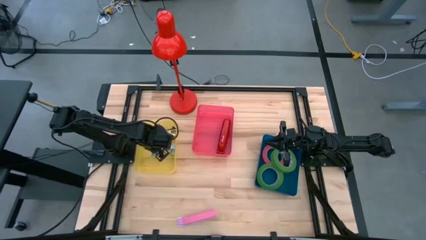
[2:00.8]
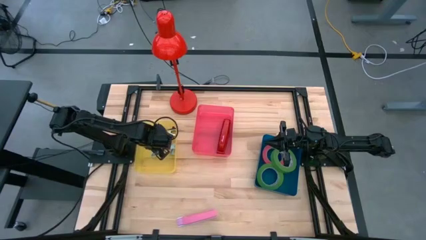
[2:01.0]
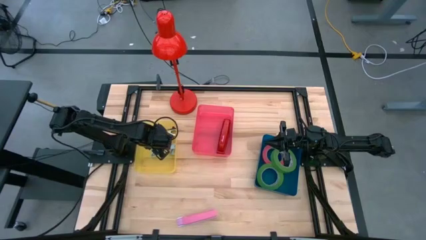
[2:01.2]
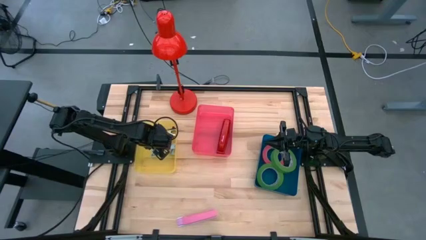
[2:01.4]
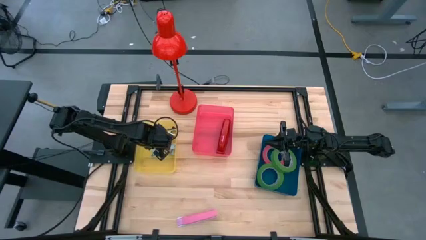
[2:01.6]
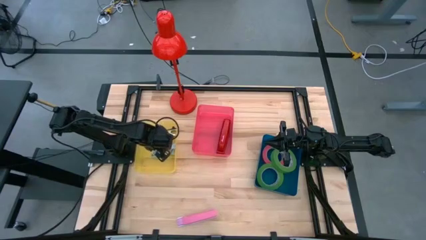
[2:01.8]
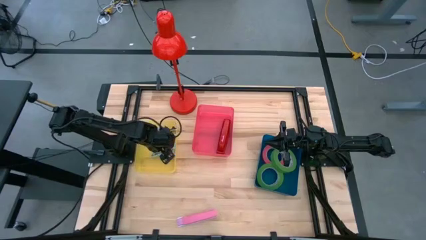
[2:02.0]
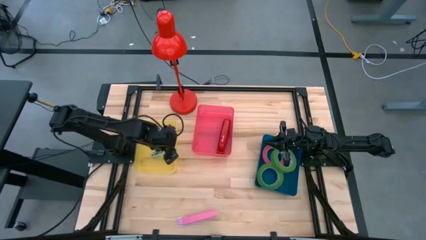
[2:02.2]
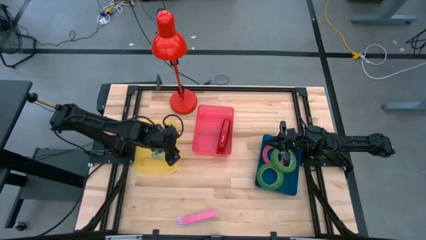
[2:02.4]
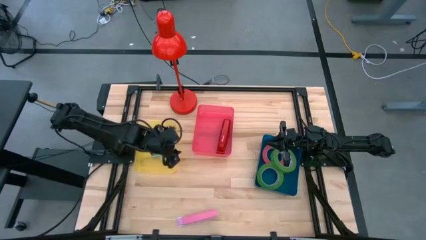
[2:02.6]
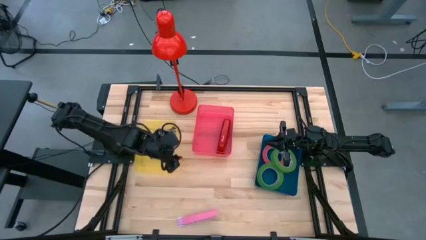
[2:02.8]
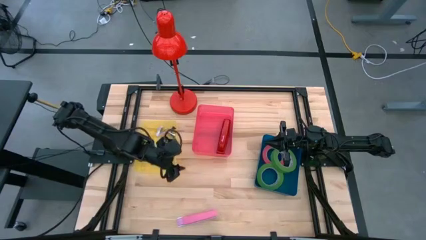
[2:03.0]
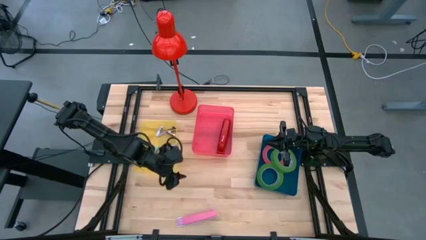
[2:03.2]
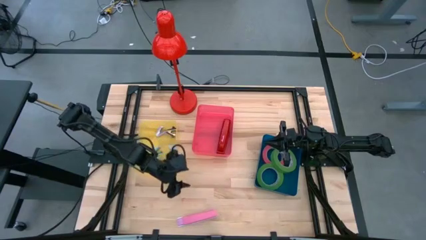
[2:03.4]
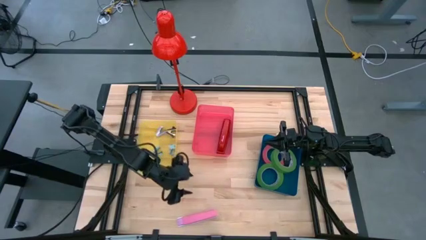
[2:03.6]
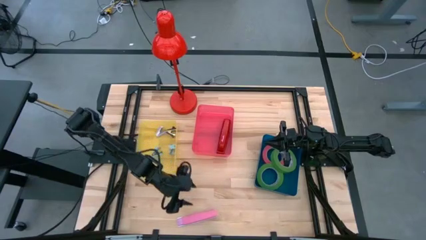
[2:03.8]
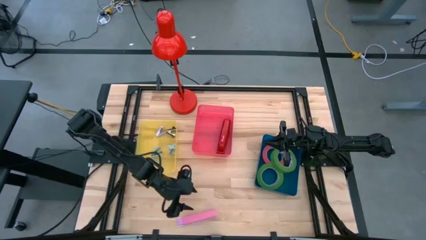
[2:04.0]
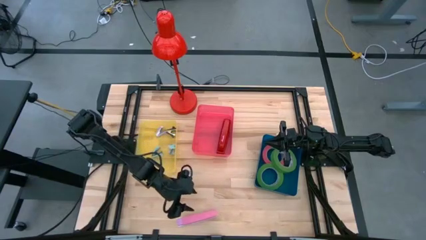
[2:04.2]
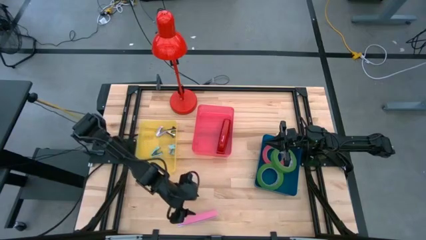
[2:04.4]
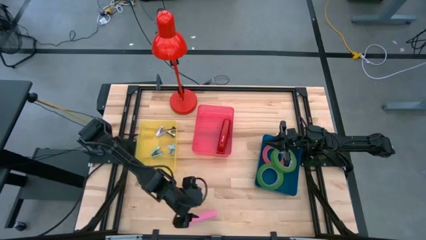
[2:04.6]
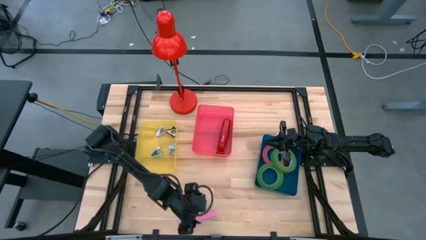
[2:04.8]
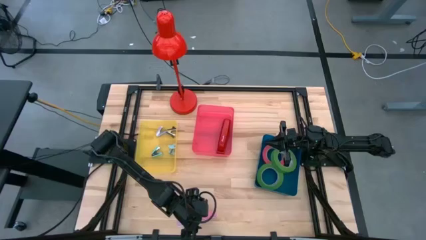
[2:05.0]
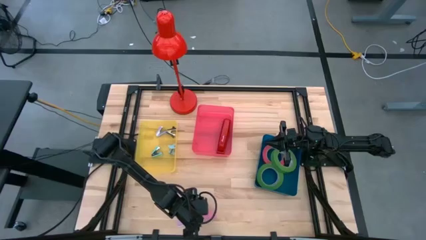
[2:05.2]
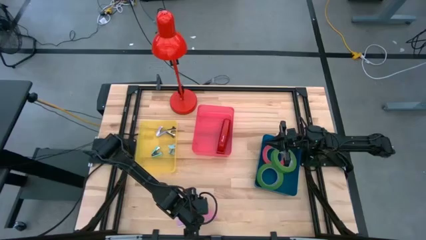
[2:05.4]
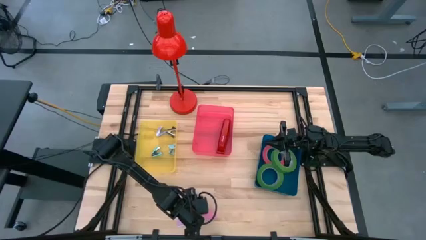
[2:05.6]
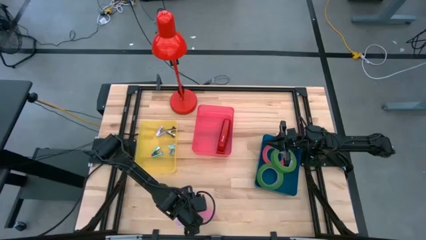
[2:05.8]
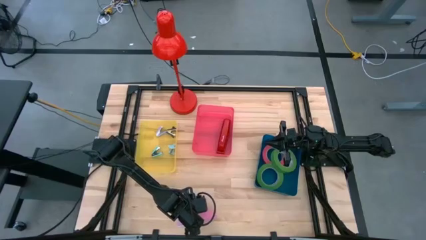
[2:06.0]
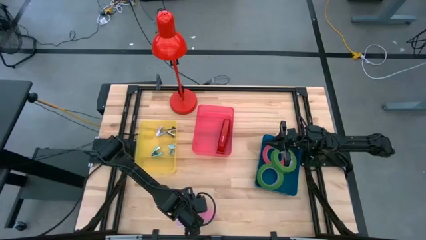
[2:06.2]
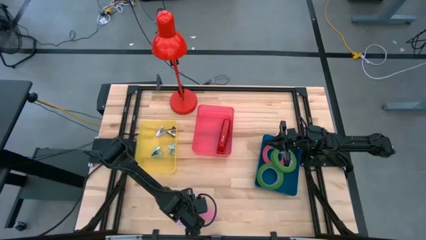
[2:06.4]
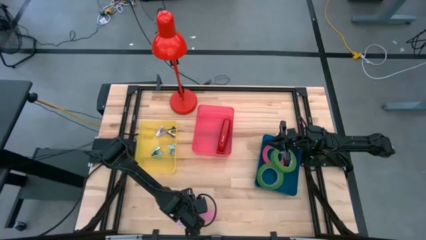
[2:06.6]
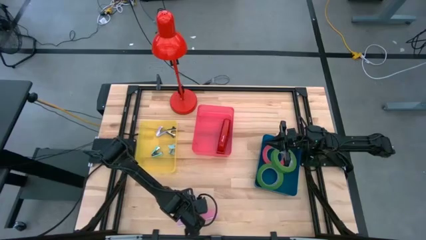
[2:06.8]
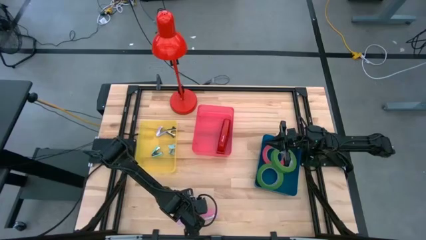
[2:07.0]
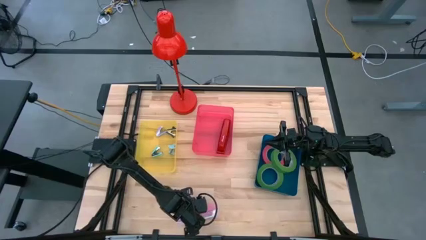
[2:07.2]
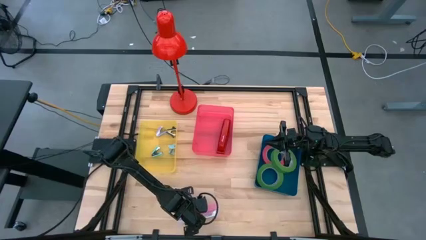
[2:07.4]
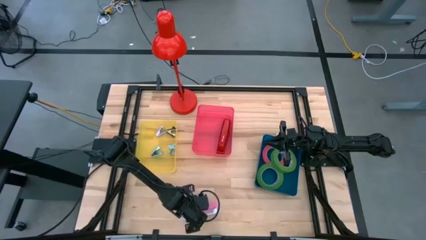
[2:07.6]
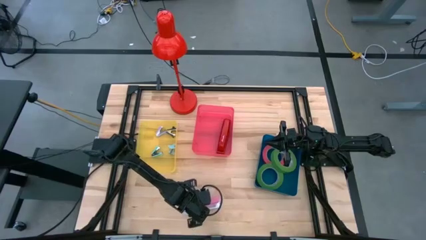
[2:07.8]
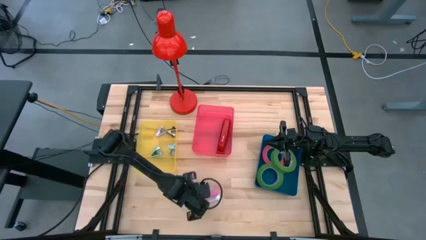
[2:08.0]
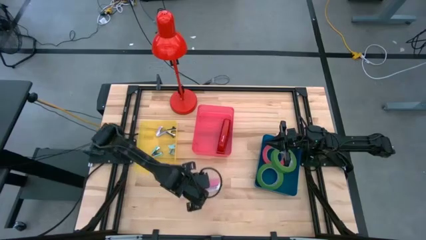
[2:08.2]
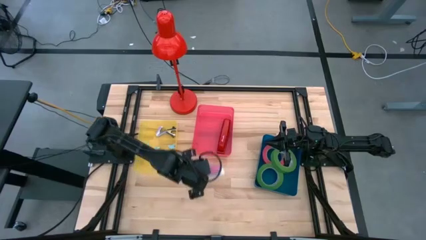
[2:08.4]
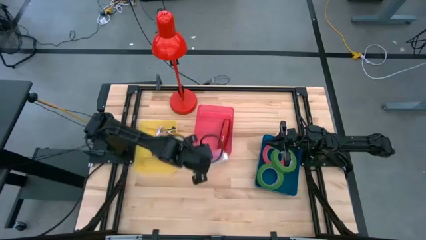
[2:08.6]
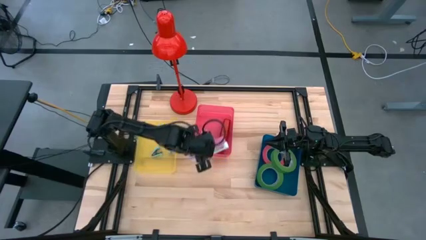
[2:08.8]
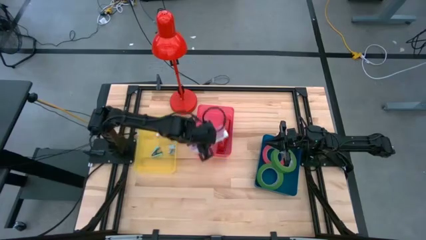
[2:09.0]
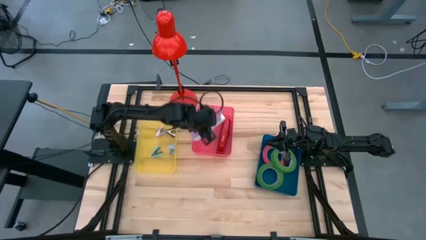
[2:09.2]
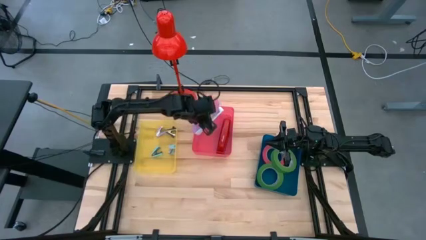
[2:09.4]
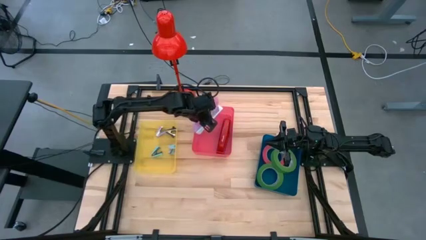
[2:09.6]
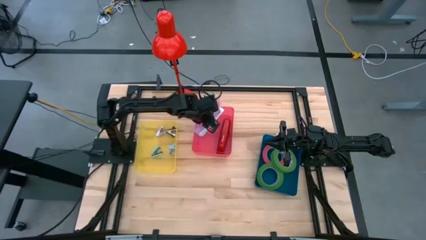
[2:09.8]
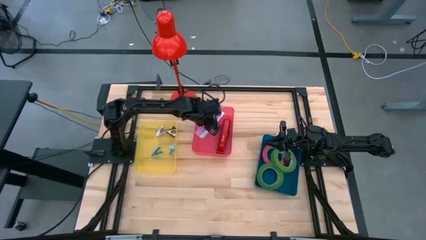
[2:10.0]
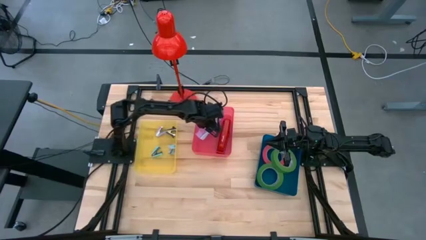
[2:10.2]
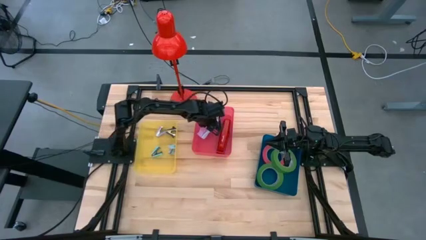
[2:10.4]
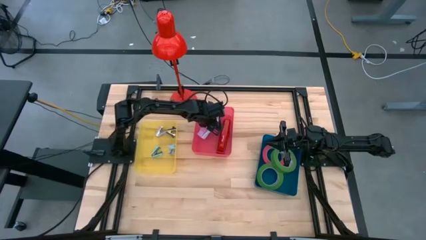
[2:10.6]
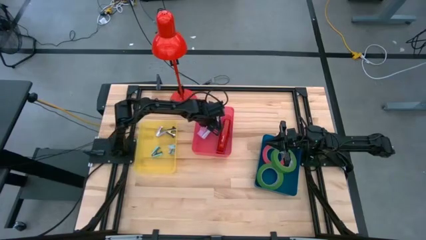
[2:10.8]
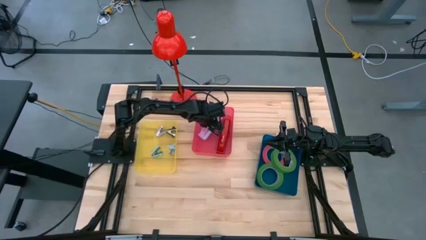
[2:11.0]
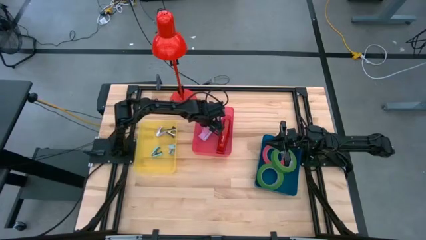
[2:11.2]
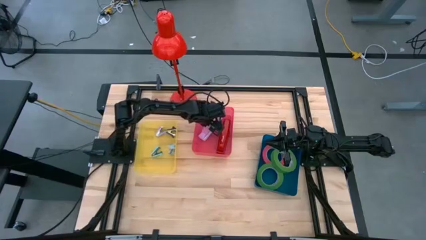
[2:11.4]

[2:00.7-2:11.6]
Task: Pick and place Stapler, Stapler remover, tape
Put the pink stapler into the red bin

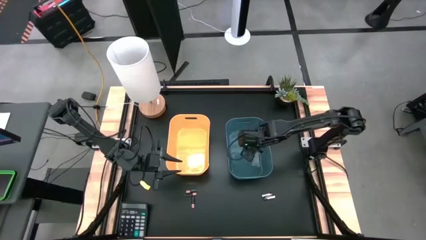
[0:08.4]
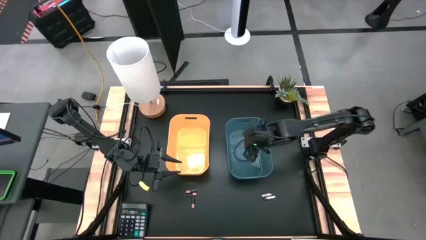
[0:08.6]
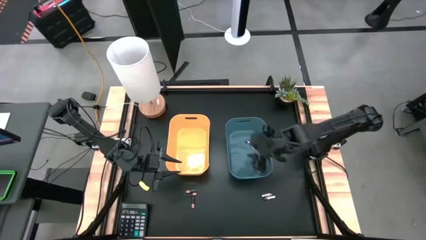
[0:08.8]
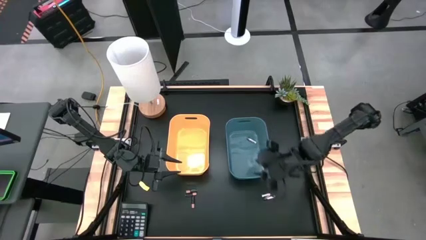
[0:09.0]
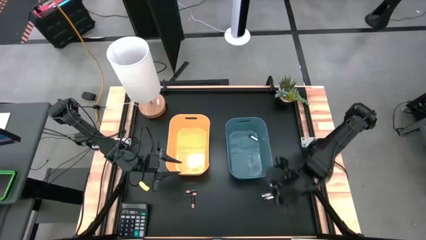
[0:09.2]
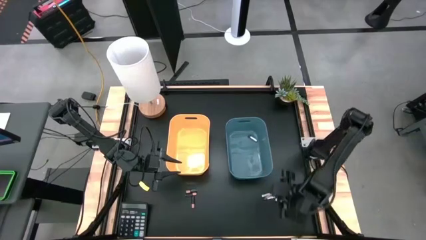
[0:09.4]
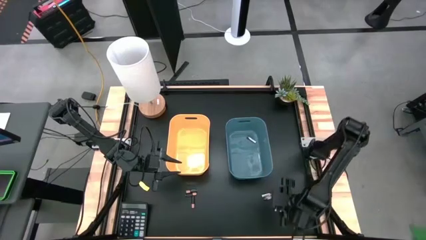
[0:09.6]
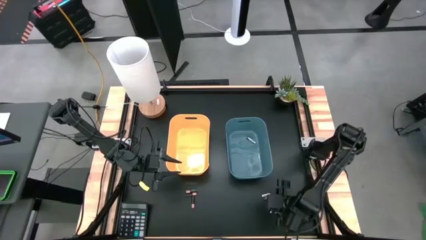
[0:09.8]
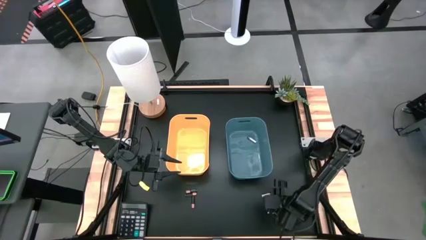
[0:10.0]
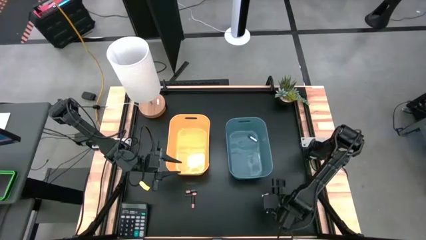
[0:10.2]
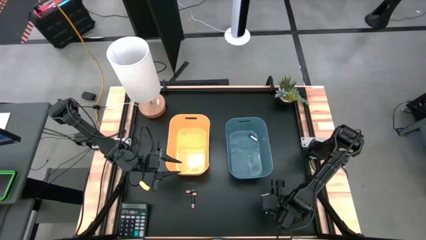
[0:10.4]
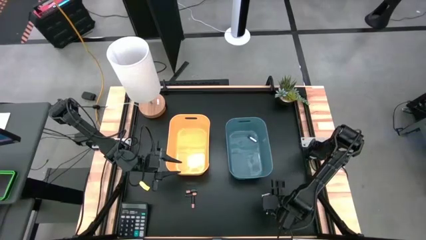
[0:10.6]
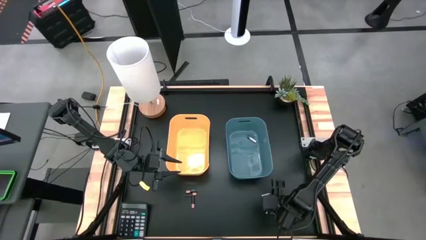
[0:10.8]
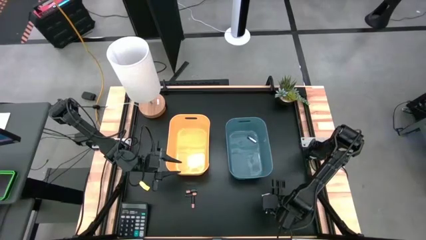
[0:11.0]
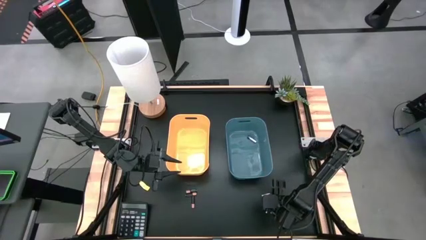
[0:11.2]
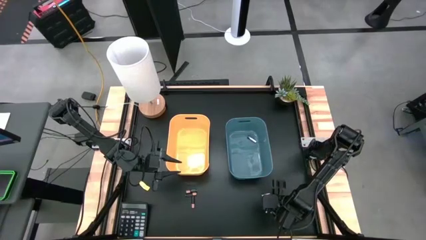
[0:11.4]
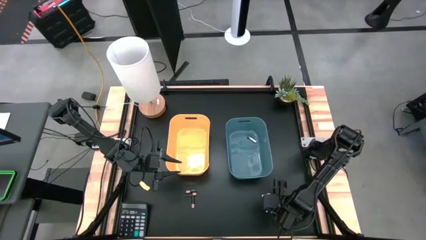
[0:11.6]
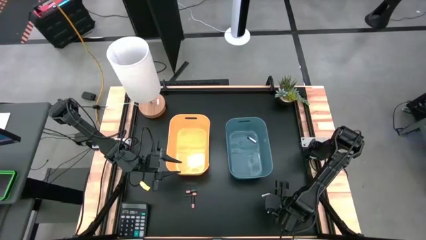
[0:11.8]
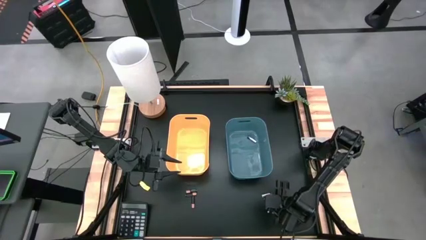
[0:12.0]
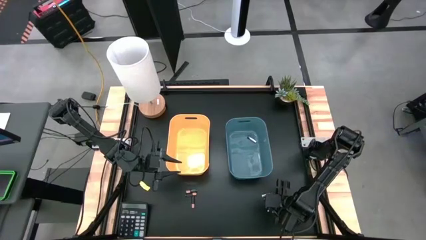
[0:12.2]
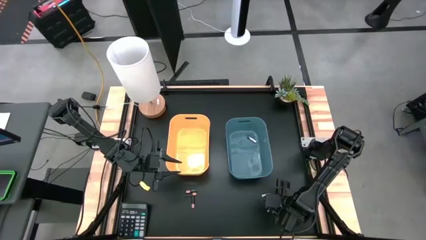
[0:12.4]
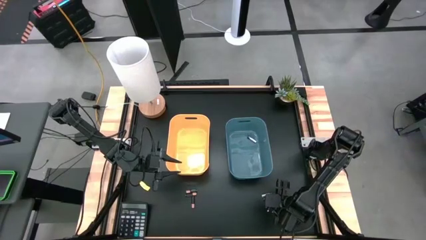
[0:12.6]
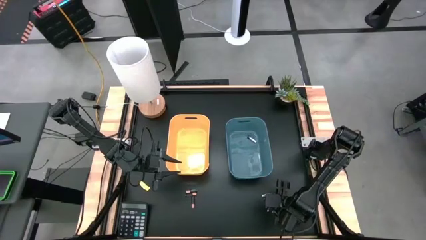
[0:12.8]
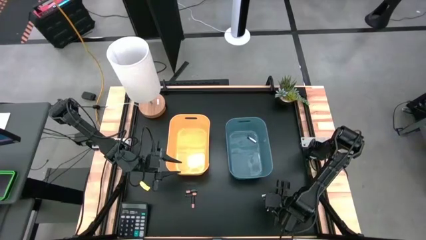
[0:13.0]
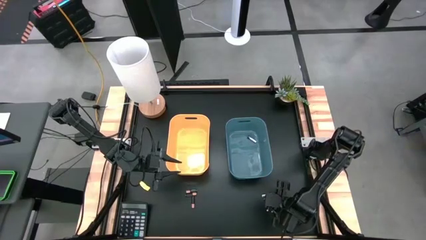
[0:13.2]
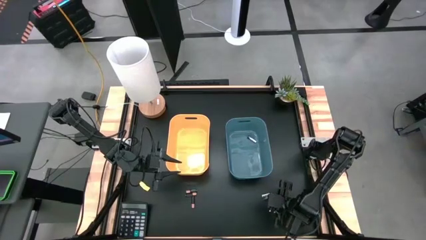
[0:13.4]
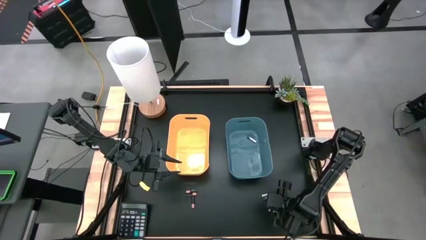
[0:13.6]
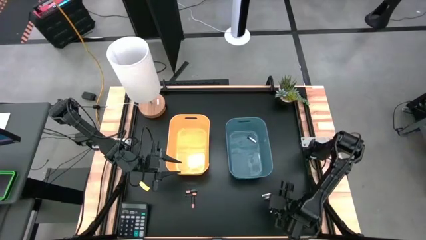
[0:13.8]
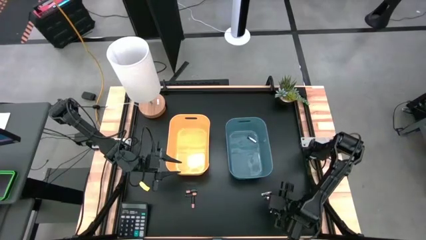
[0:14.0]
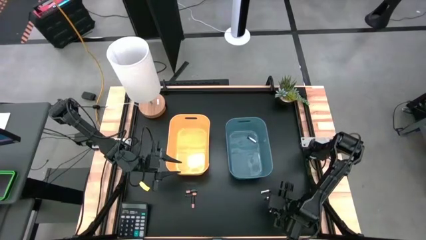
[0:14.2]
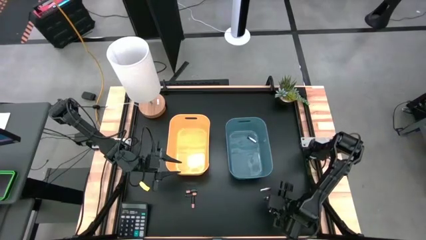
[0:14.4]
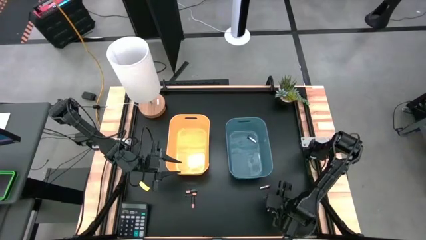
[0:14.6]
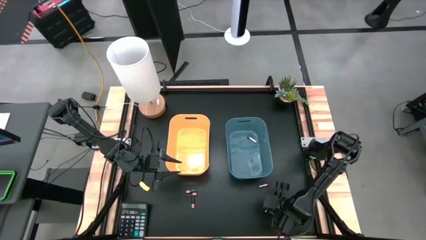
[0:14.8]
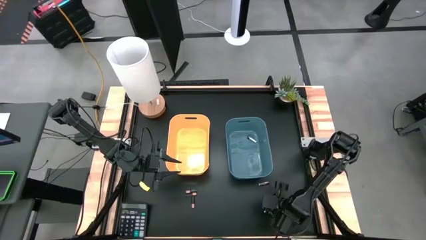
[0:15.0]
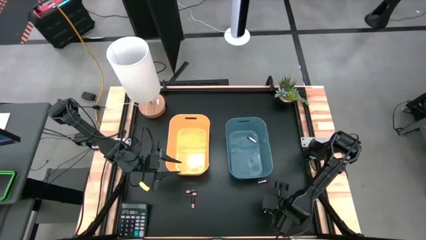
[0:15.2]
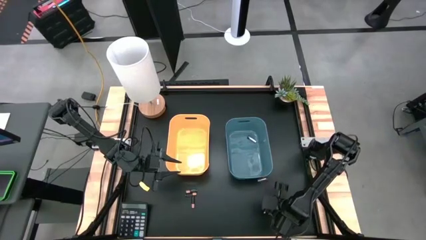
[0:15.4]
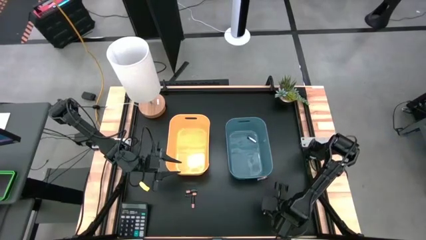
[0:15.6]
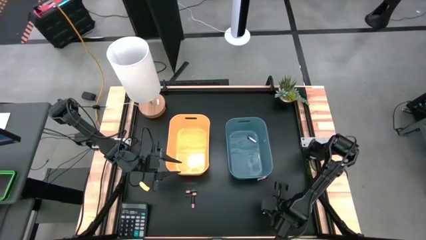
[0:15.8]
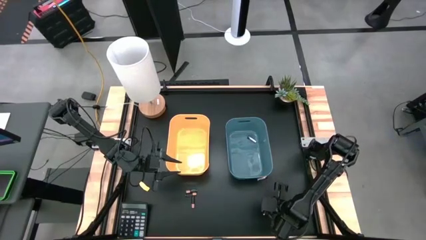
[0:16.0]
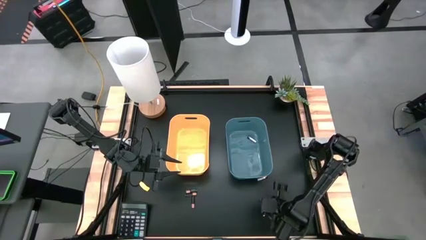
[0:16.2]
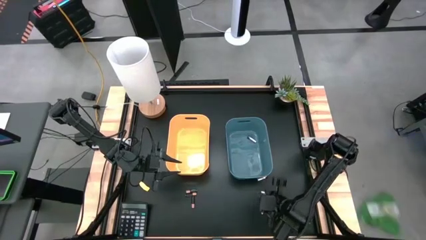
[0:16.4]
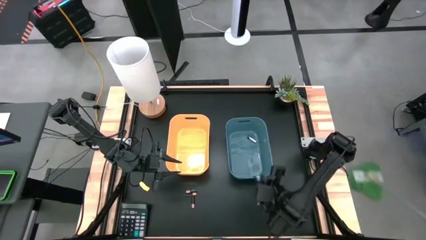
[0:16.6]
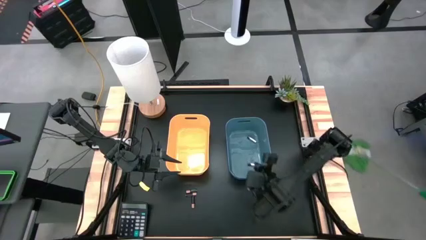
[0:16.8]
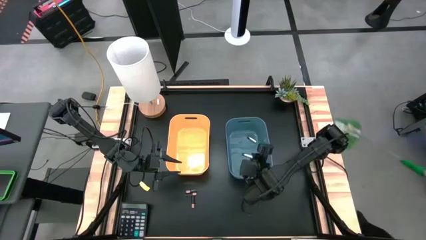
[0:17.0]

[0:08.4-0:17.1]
Task: Sort batteries
Put the bottom silver battery into the blue bin
